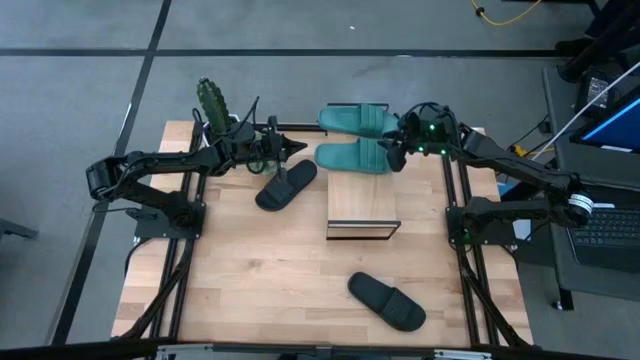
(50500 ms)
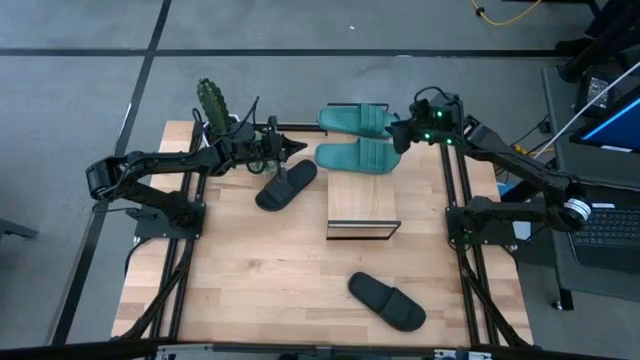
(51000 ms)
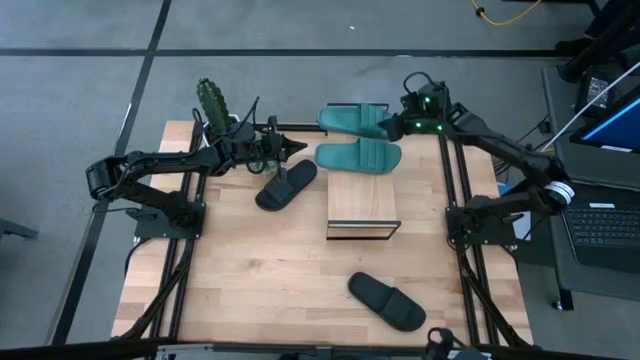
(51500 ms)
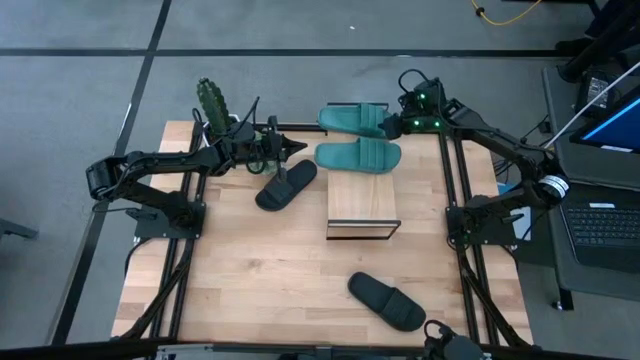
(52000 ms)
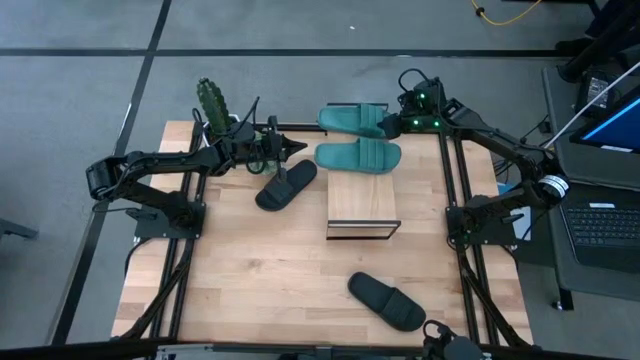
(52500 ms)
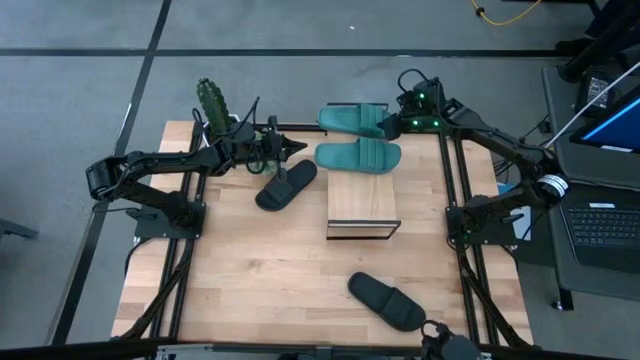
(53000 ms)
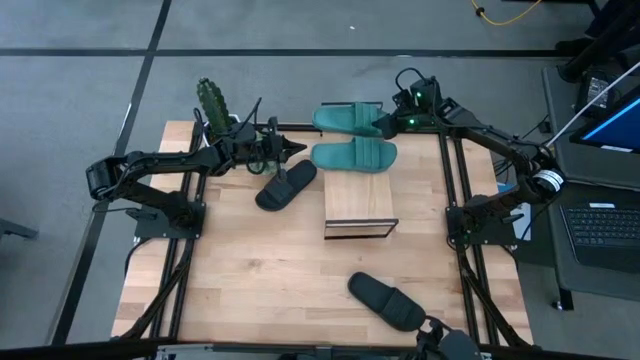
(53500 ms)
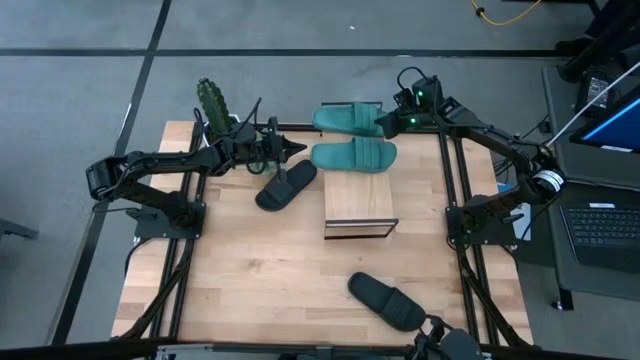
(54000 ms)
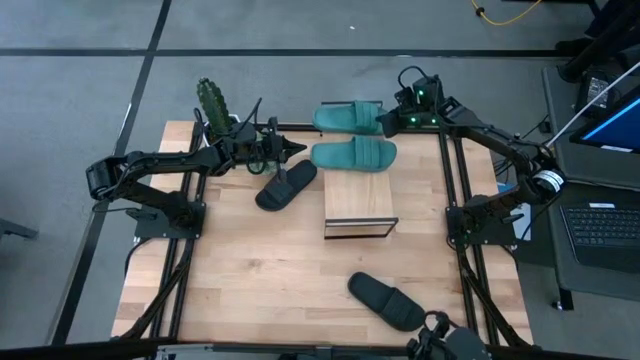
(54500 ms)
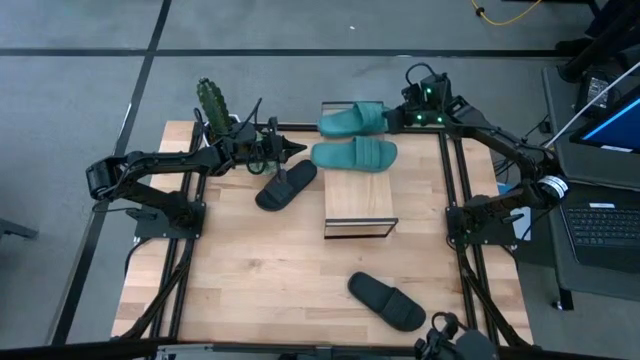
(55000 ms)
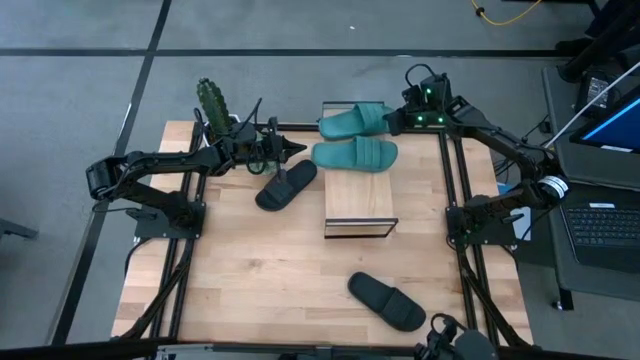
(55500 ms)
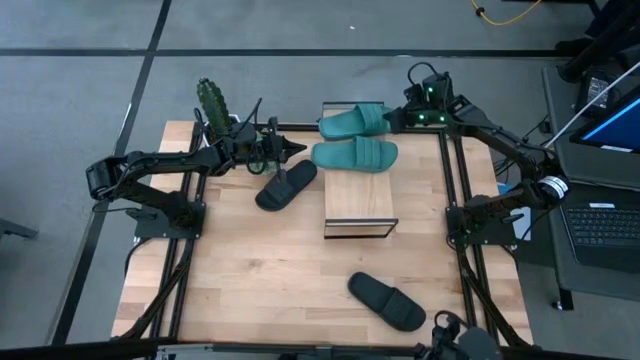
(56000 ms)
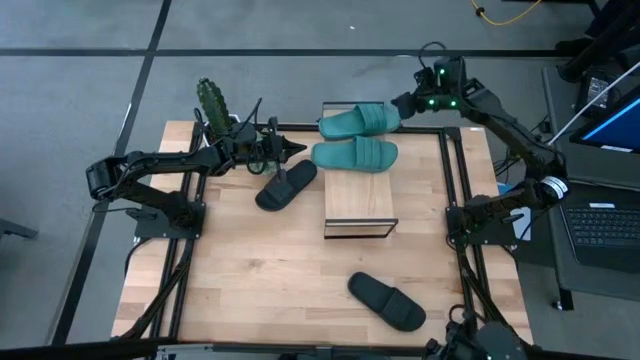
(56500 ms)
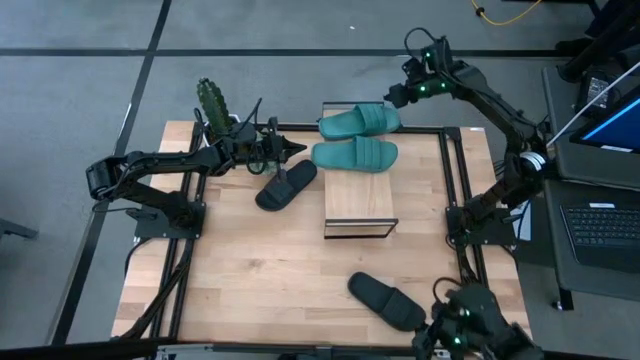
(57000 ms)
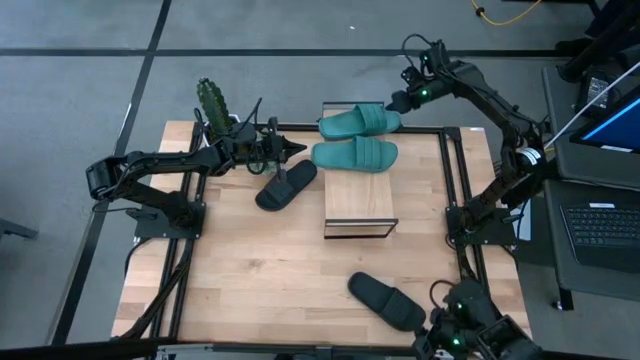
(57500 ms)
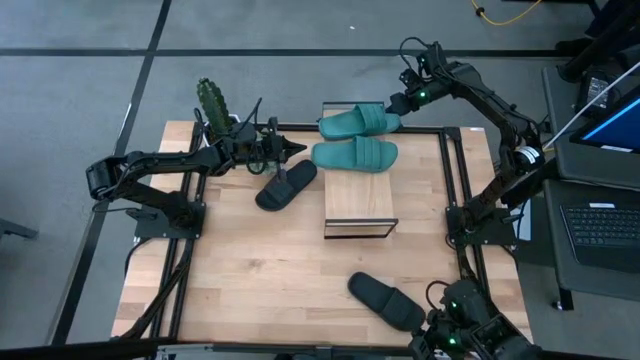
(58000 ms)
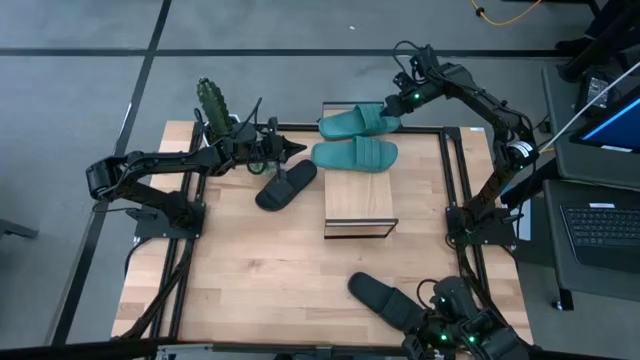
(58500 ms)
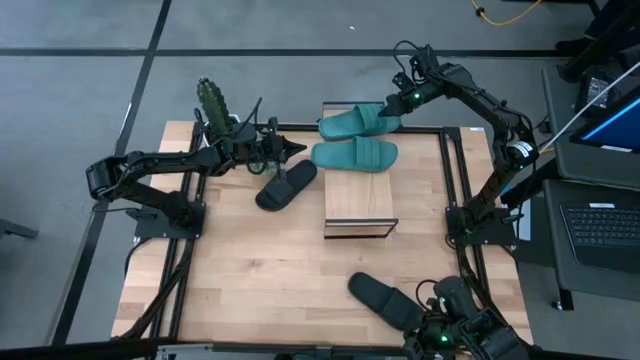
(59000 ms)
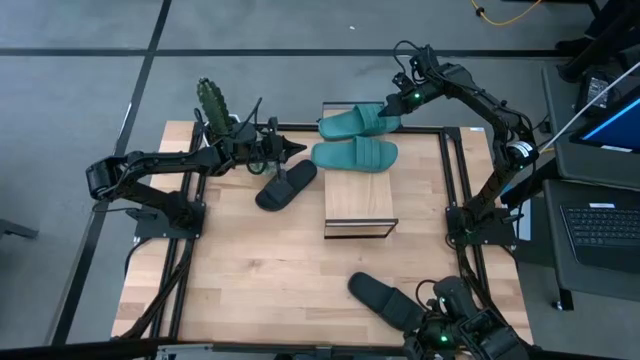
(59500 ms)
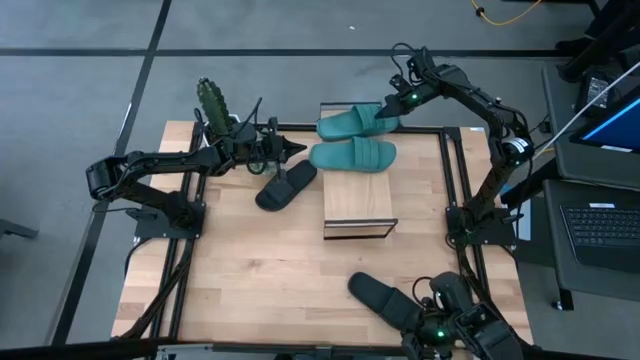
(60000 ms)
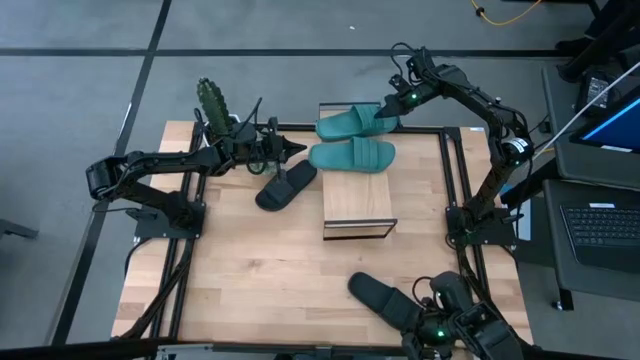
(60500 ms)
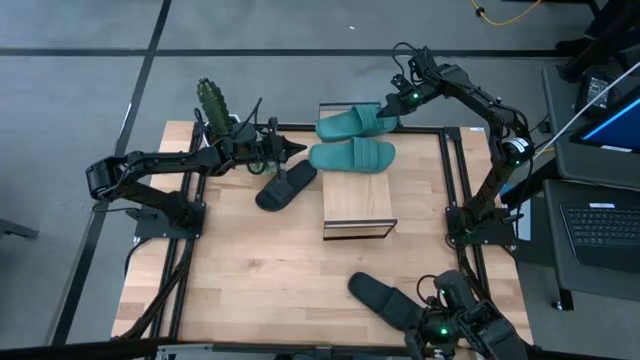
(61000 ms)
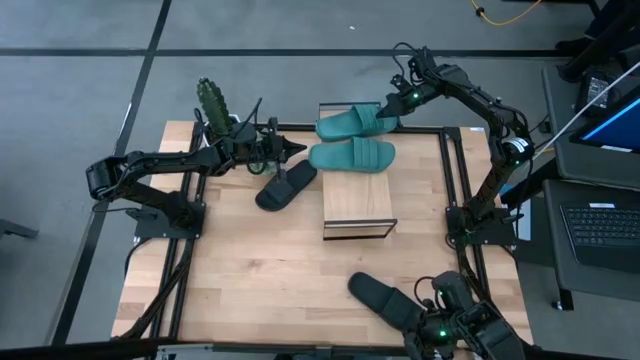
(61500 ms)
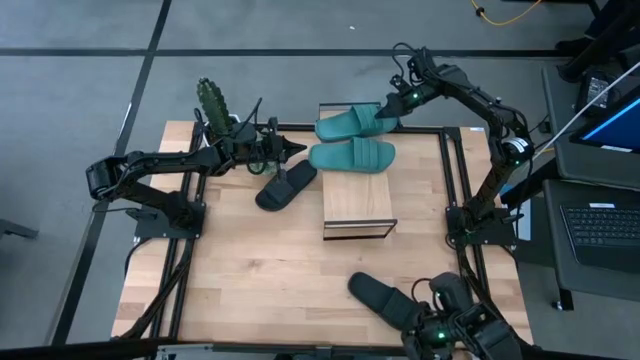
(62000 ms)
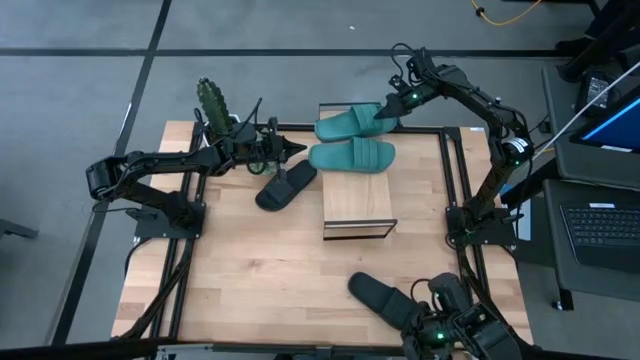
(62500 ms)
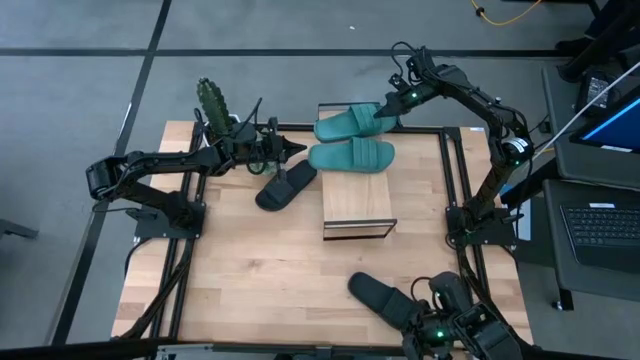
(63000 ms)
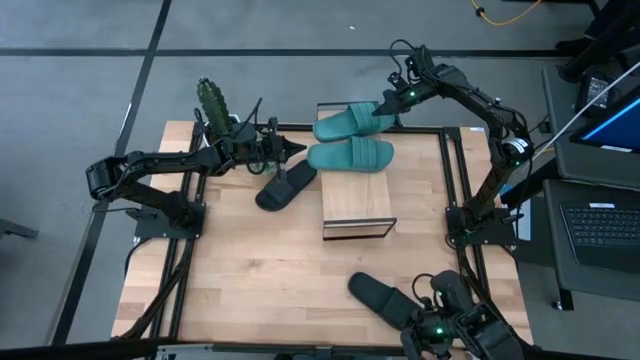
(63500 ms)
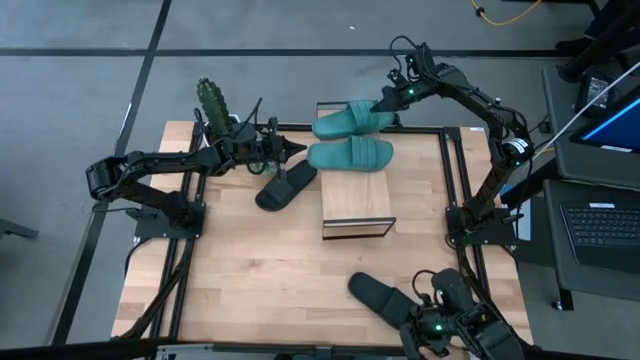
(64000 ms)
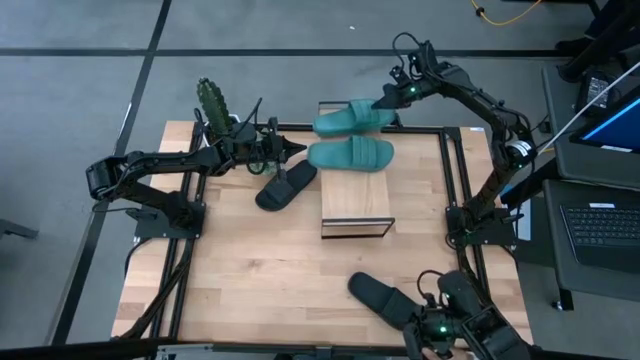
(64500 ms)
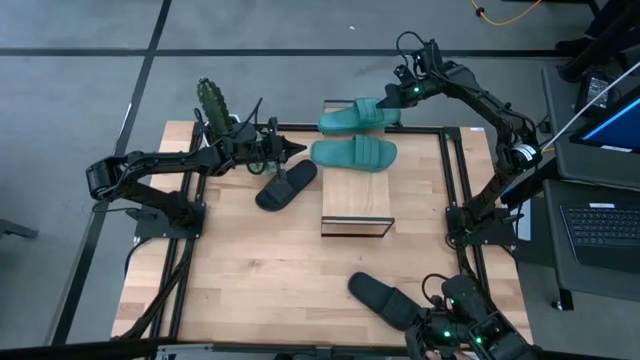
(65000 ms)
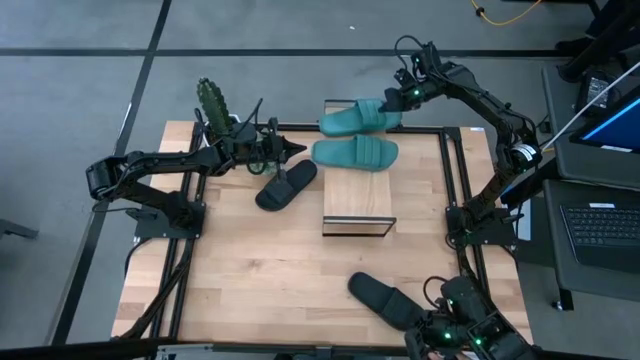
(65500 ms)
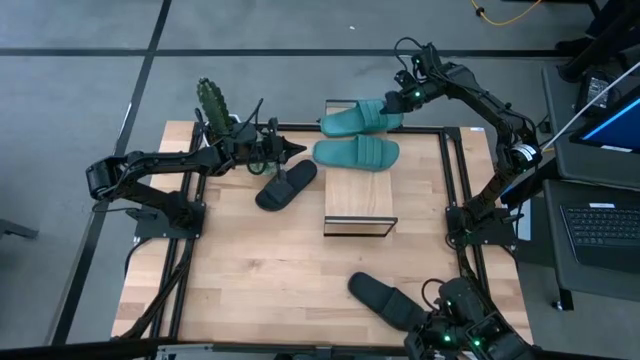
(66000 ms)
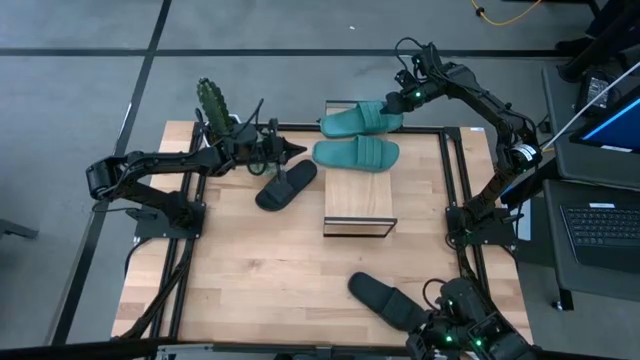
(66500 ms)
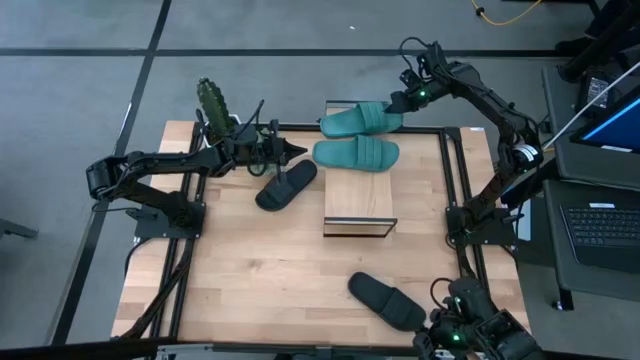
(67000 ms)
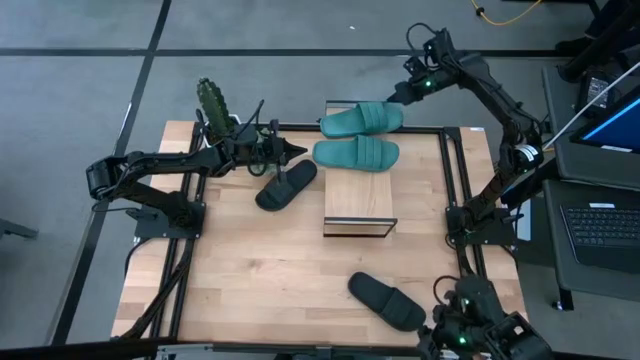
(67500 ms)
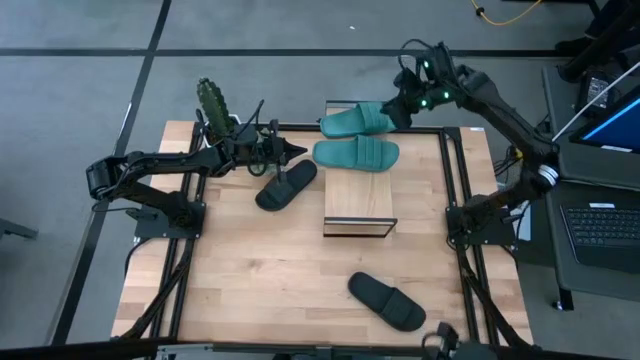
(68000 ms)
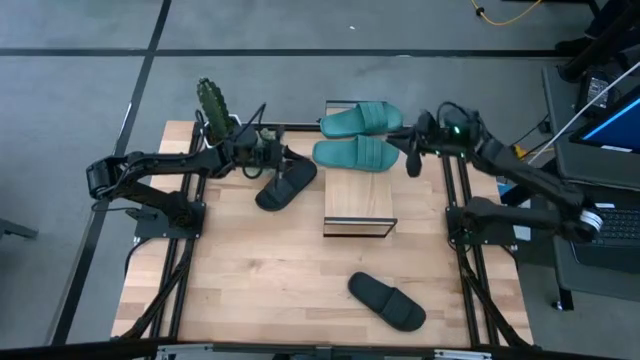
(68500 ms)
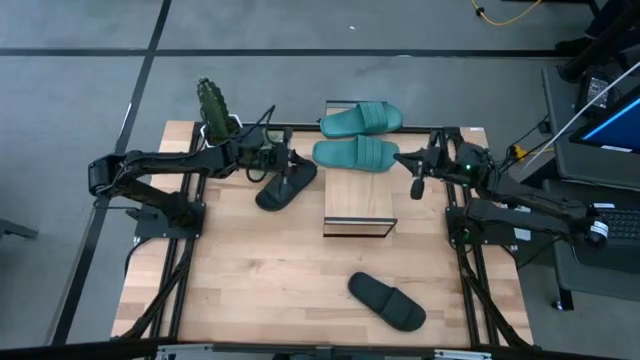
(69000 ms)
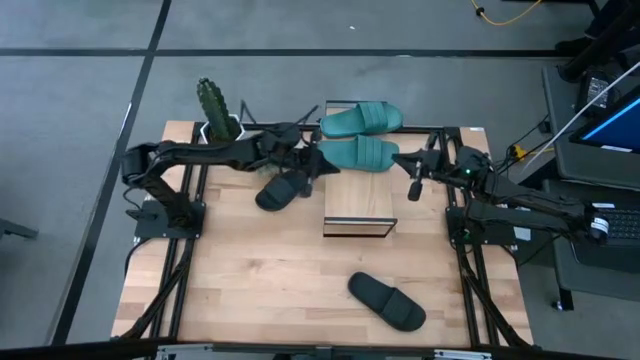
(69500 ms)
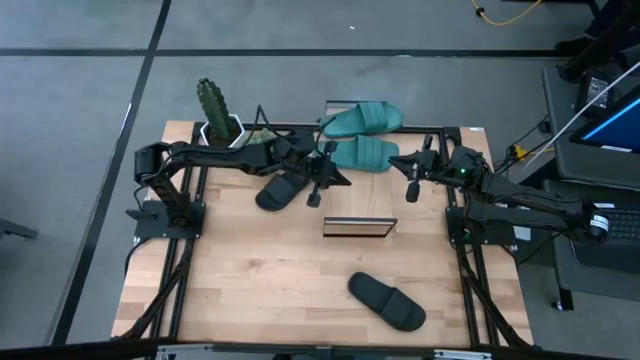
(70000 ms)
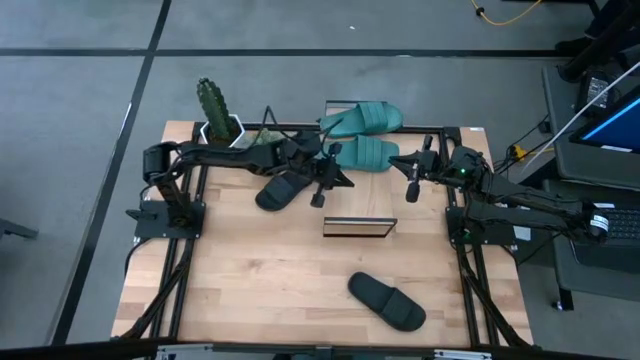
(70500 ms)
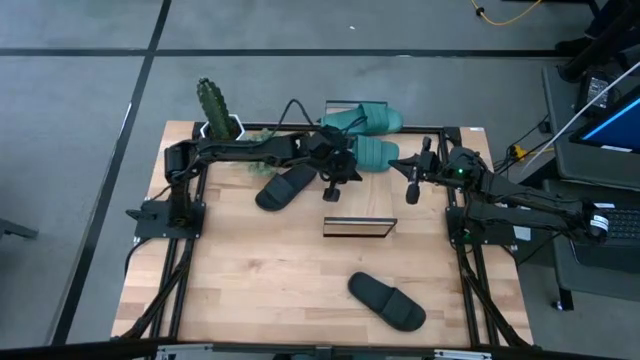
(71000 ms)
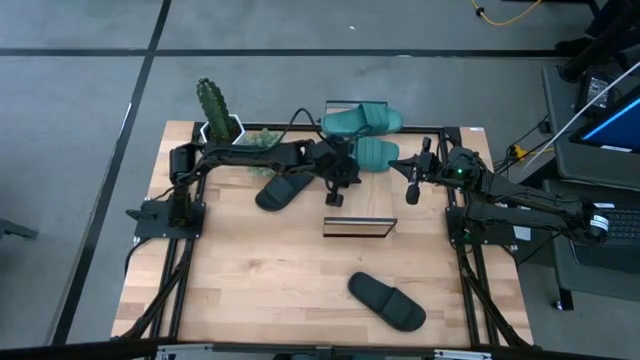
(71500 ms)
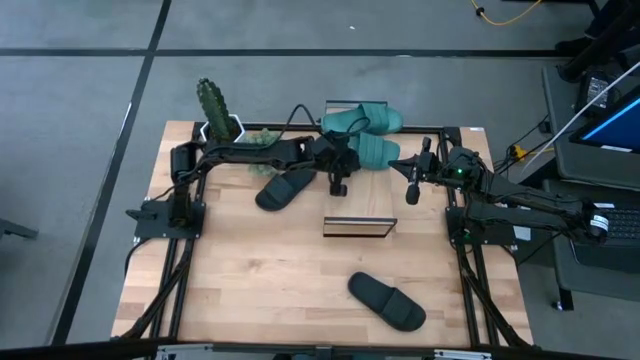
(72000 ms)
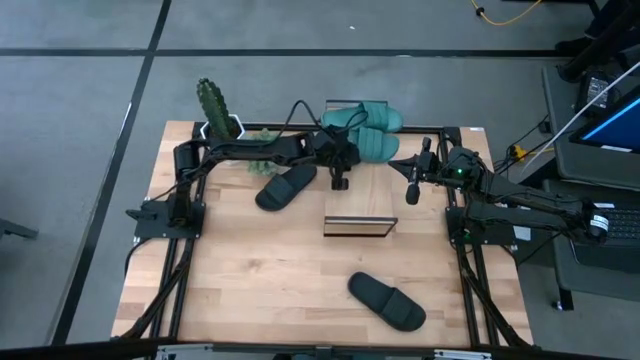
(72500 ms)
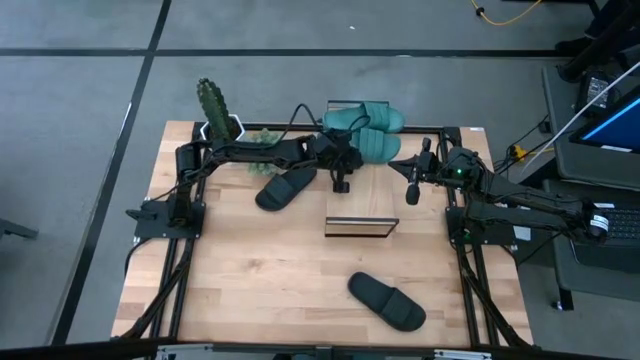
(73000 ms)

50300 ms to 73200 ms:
Task: Pick and place slides into the shelf
Adjust the green slides on the shelf
